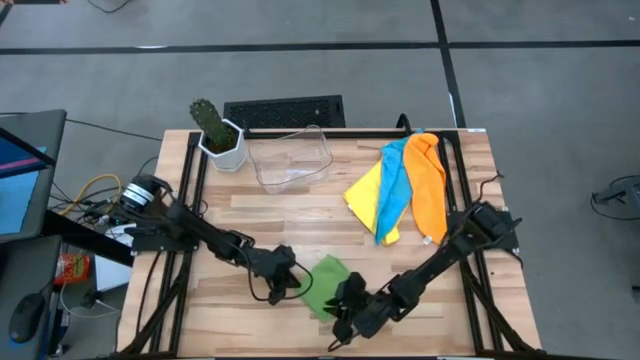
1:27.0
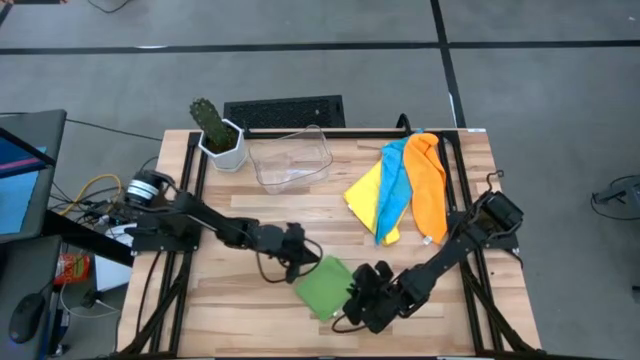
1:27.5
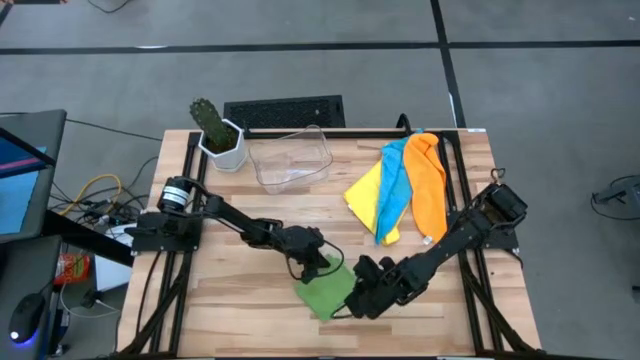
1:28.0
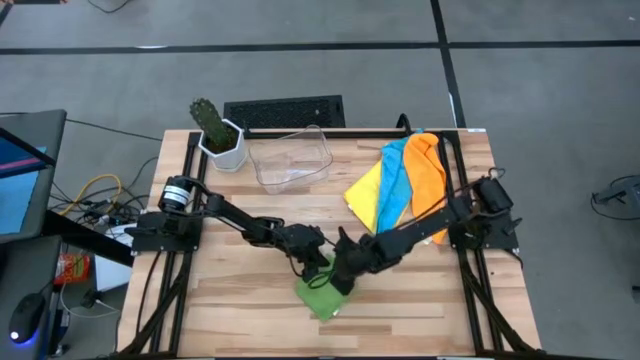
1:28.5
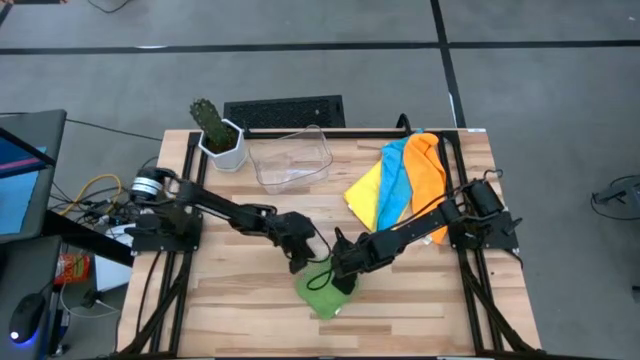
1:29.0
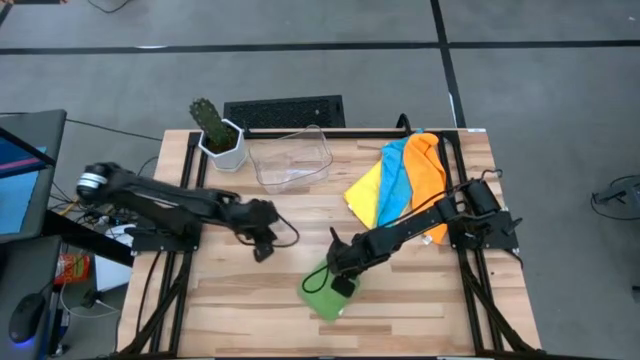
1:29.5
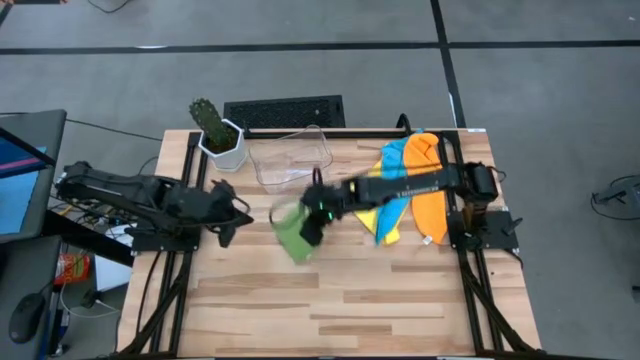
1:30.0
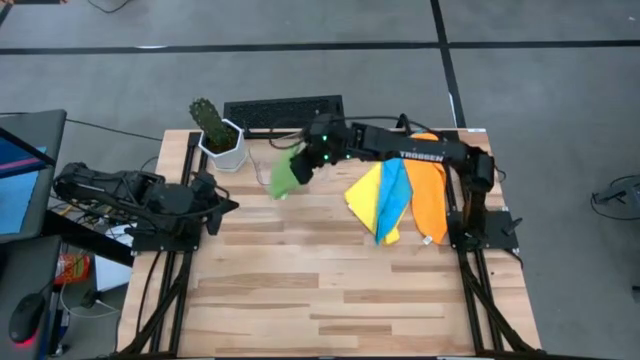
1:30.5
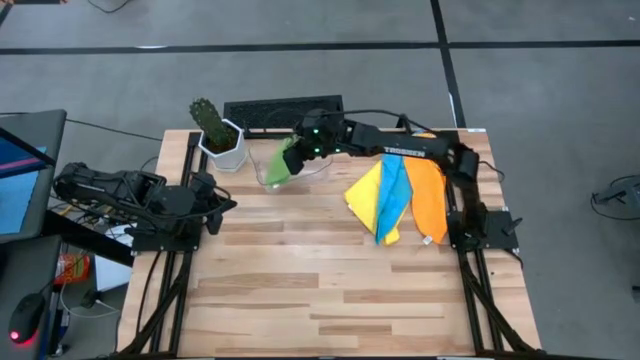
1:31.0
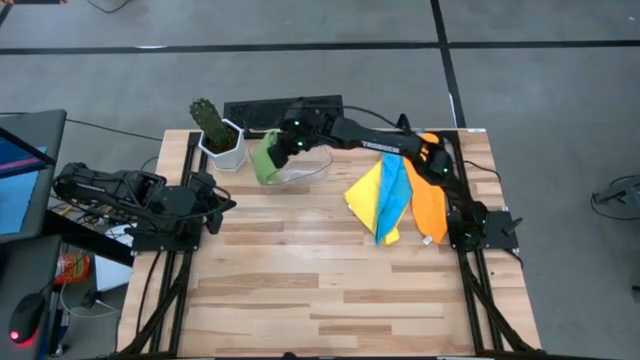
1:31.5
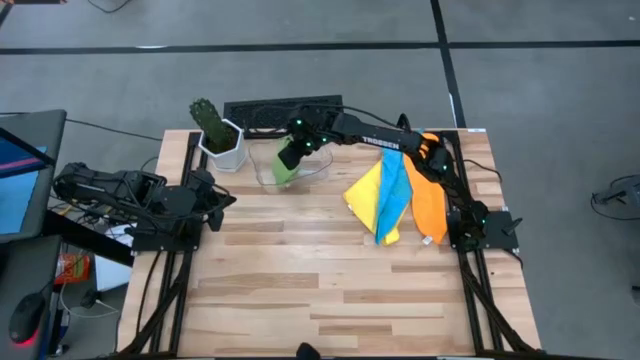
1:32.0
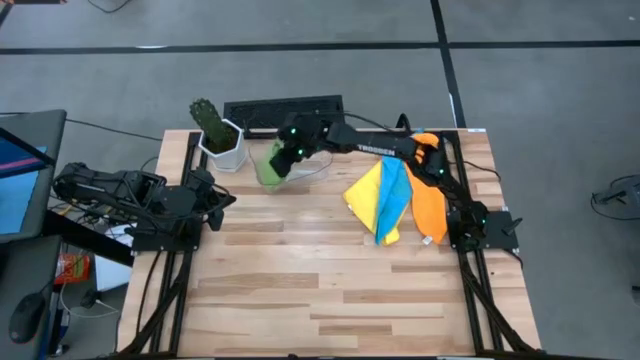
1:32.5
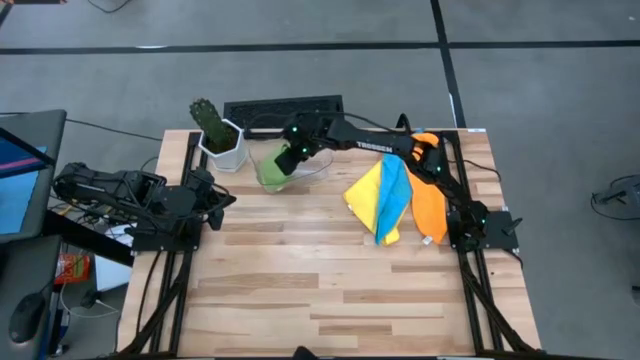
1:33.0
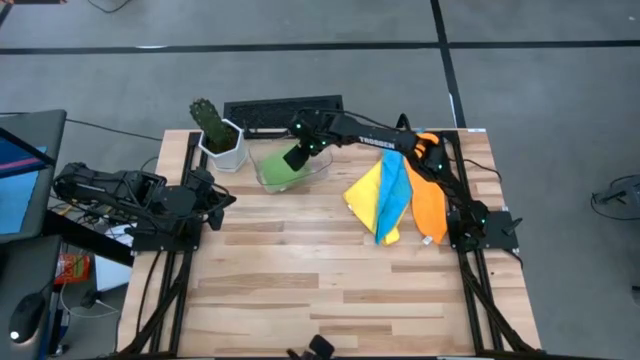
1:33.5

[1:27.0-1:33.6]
Task: Fold microfiber towels
Put the green microfiber cloth into the transparent bin

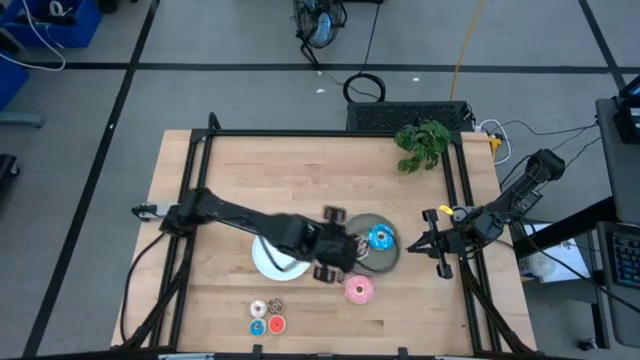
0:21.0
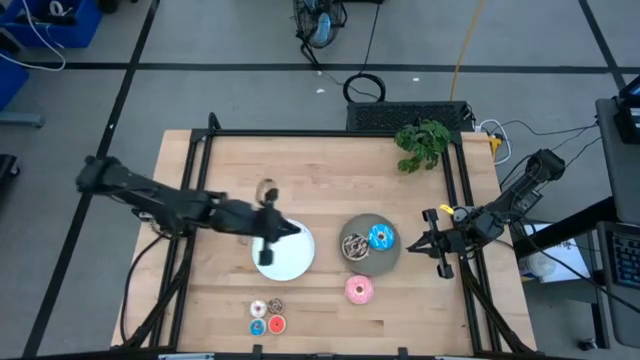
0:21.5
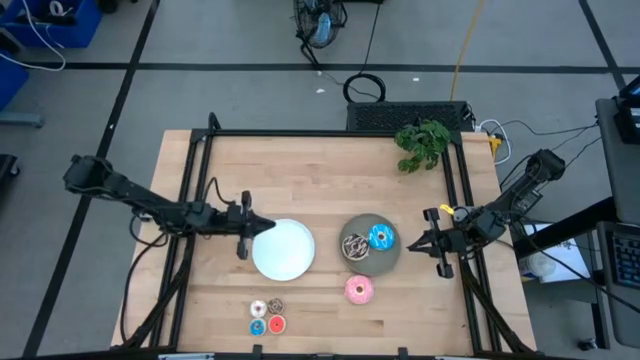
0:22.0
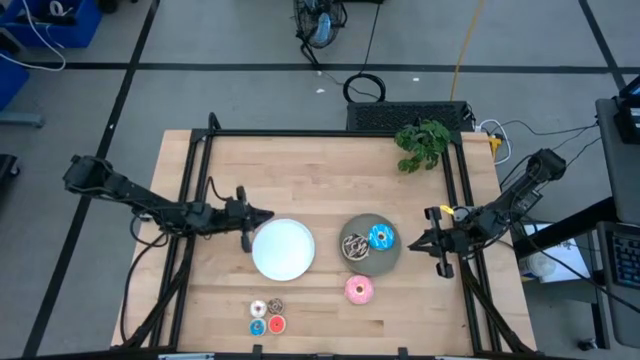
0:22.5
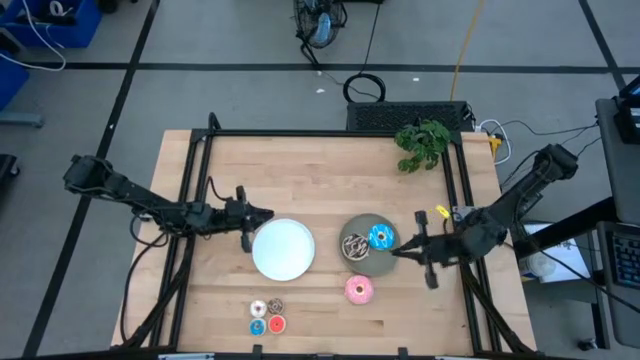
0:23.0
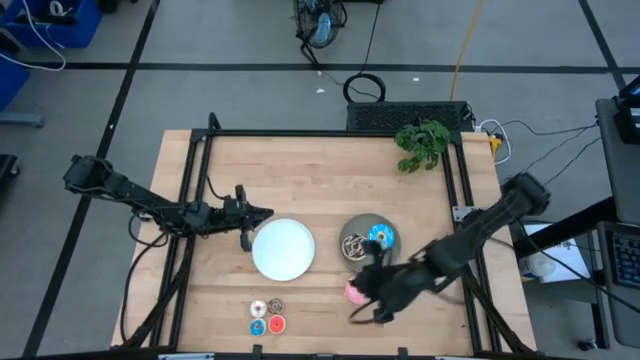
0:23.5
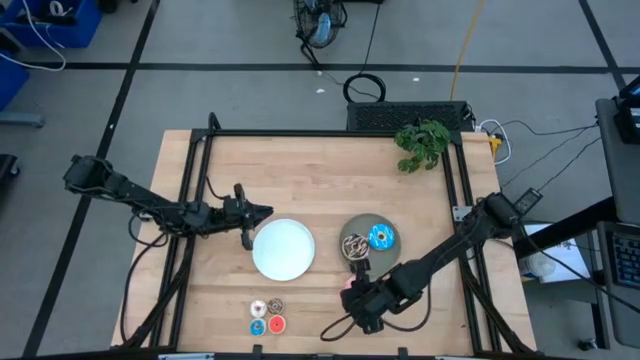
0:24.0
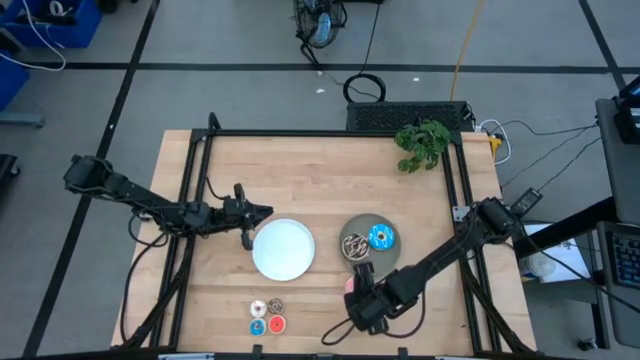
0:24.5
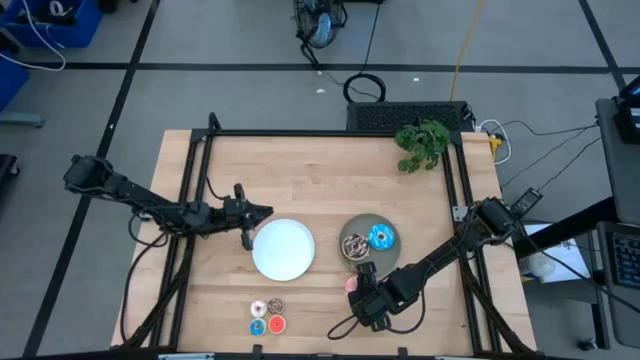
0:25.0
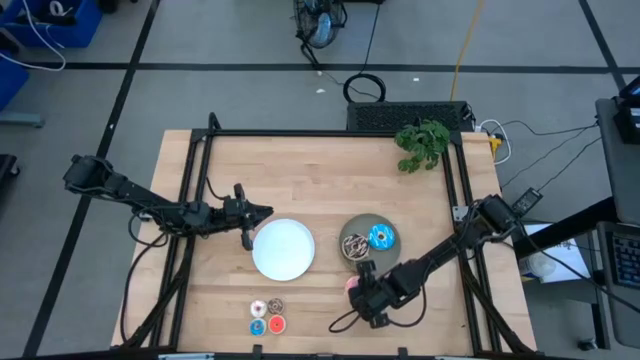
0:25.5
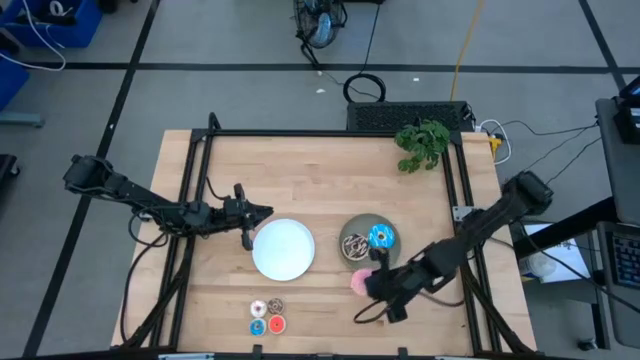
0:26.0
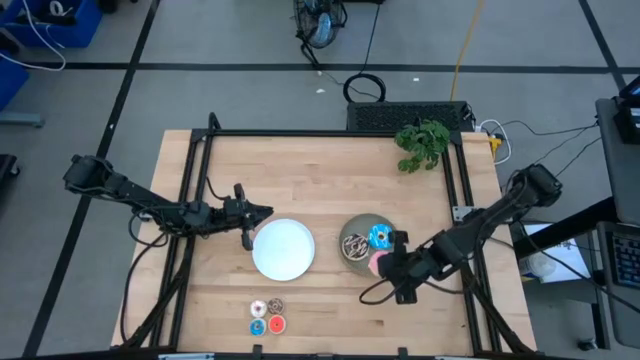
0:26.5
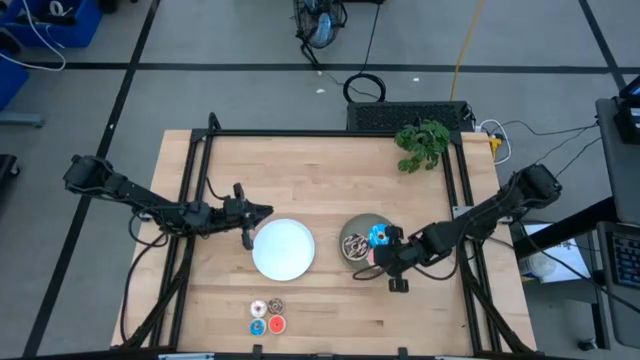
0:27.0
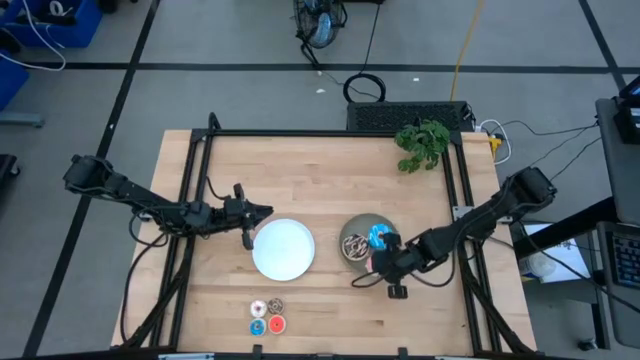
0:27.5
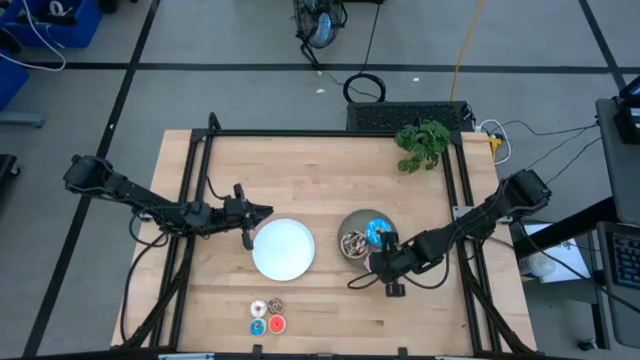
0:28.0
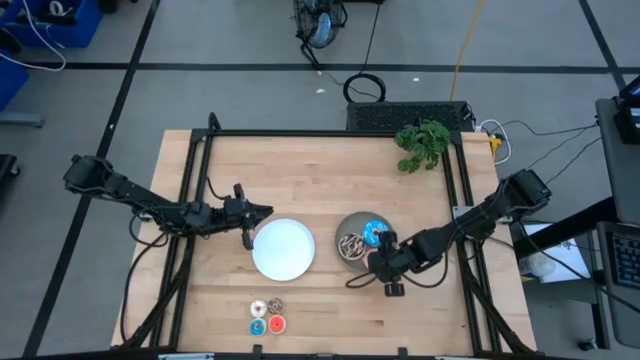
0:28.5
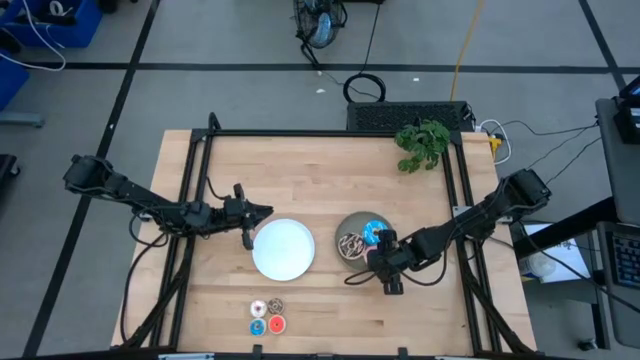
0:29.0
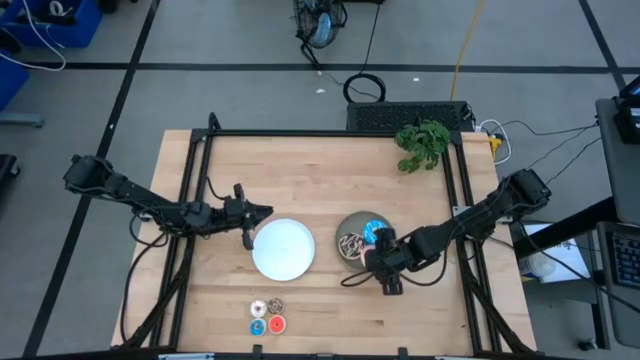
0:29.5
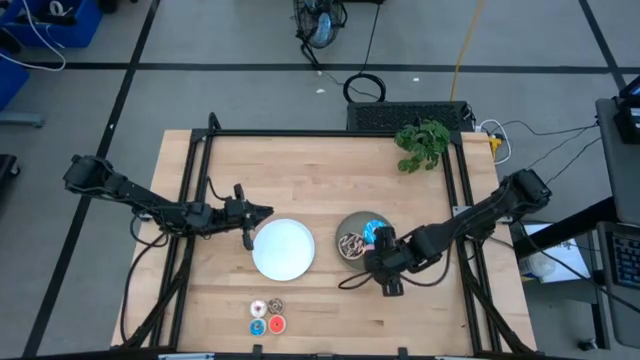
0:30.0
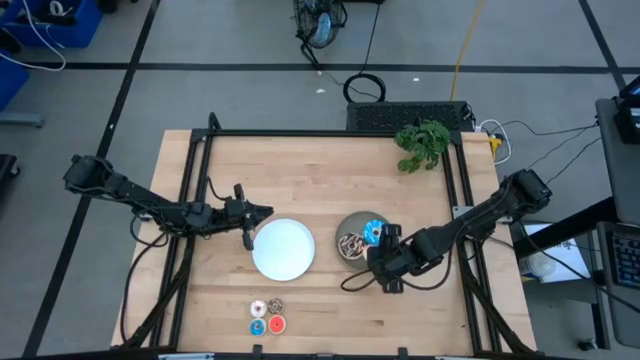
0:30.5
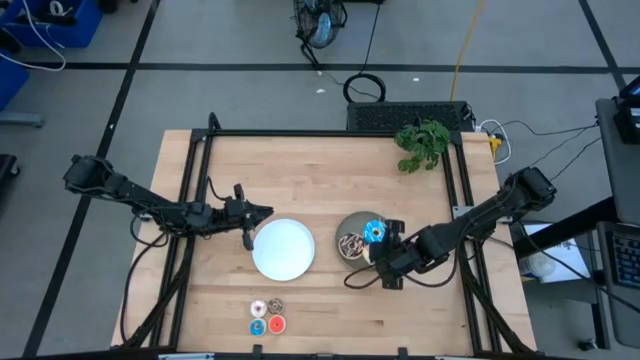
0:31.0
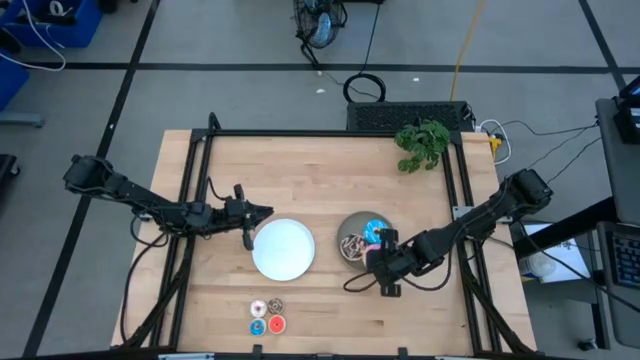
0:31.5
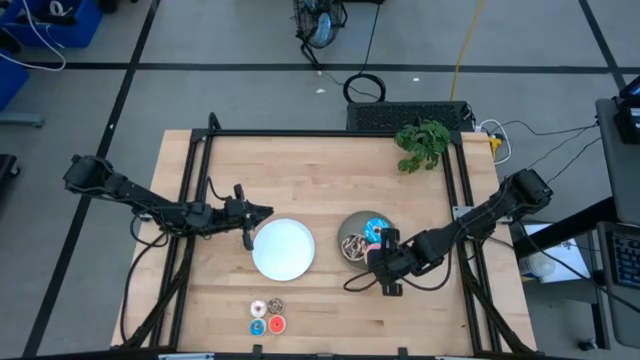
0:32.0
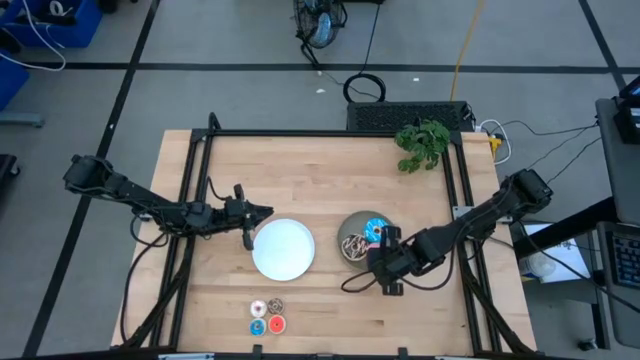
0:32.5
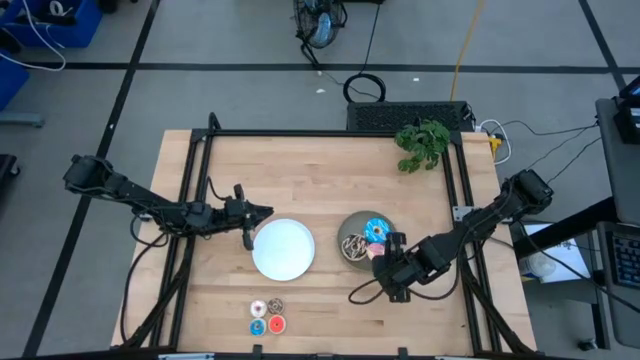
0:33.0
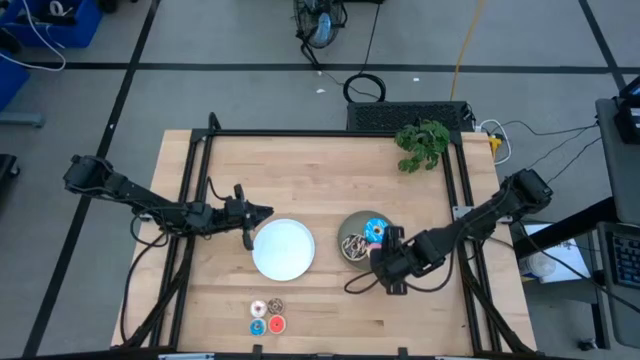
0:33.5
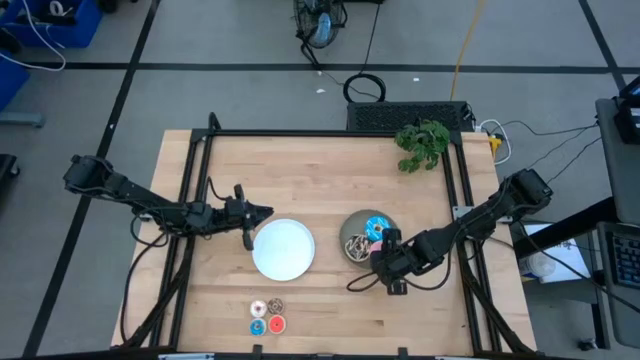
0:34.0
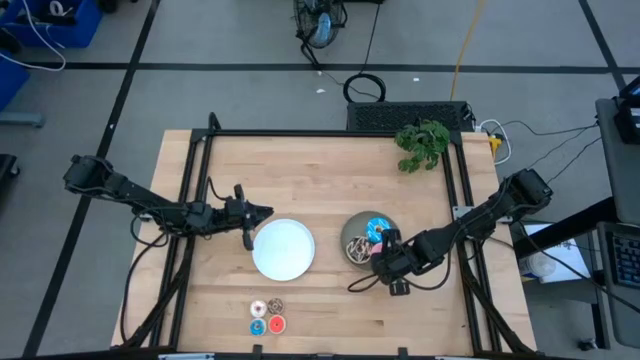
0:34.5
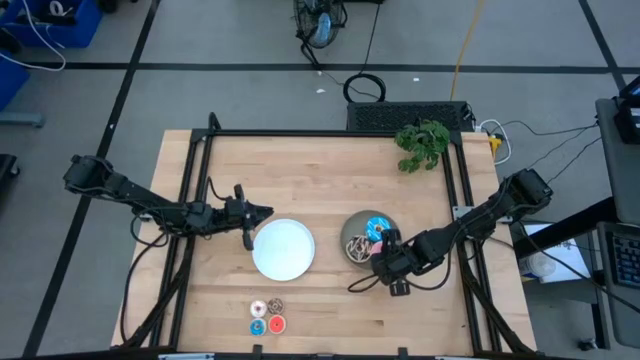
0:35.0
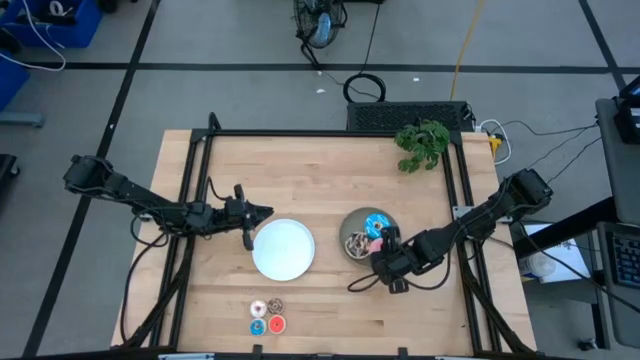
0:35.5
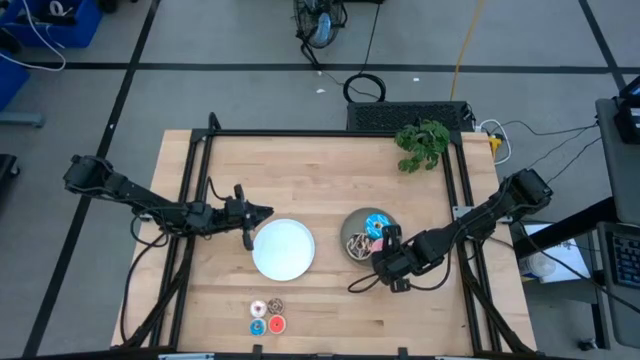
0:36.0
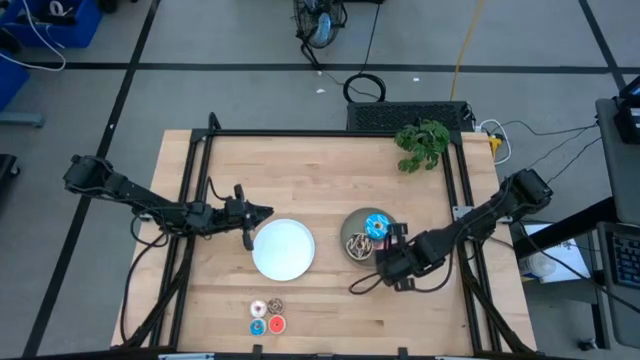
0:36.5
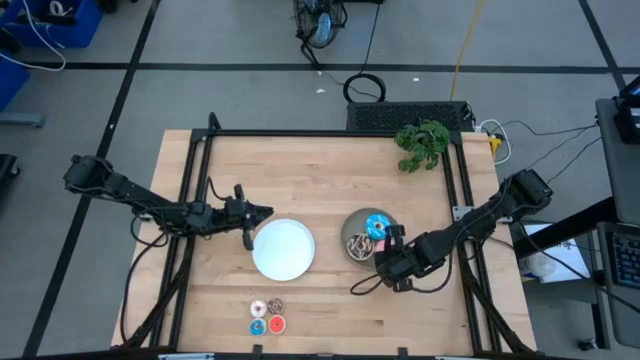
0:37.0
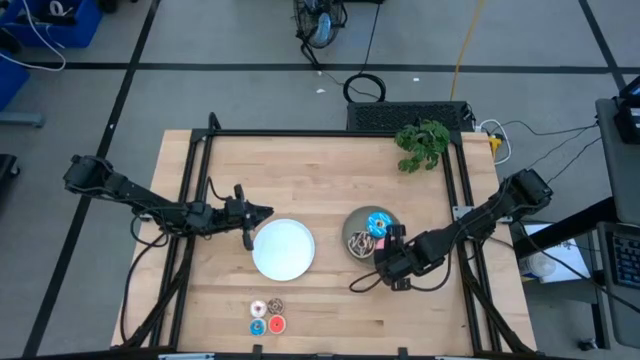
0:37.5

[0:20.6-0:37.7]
Task: Pick & Place donuts
Put the large pink donut on the gray plate
